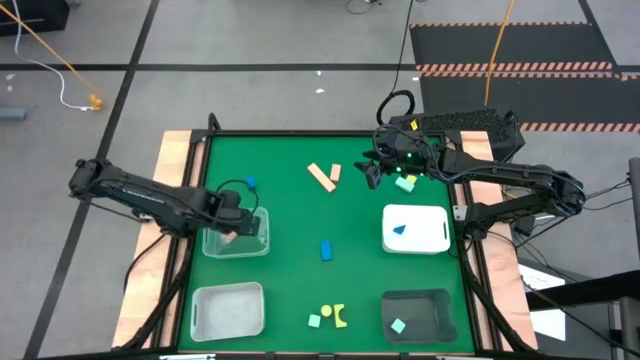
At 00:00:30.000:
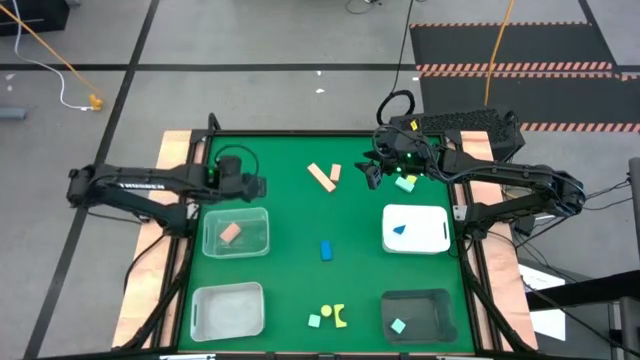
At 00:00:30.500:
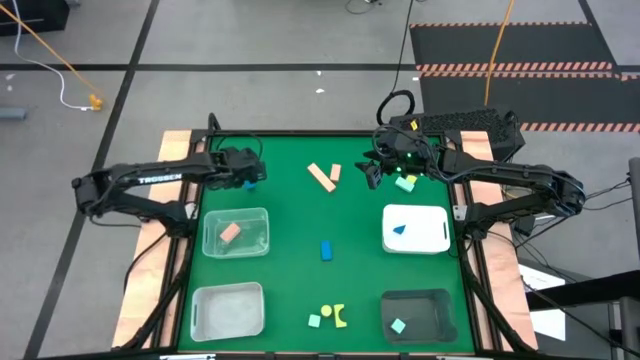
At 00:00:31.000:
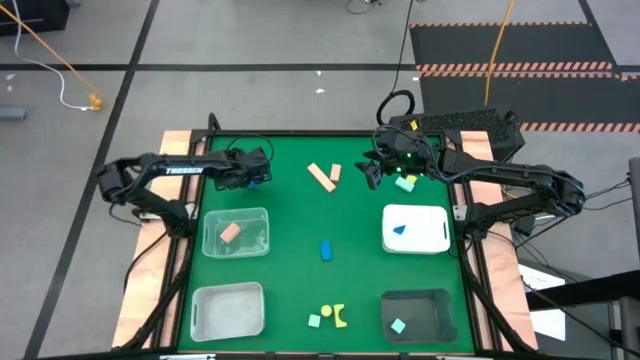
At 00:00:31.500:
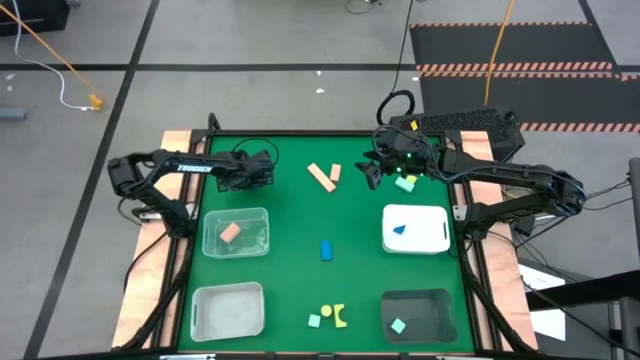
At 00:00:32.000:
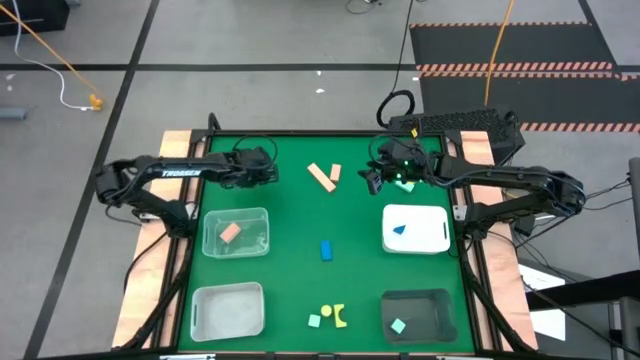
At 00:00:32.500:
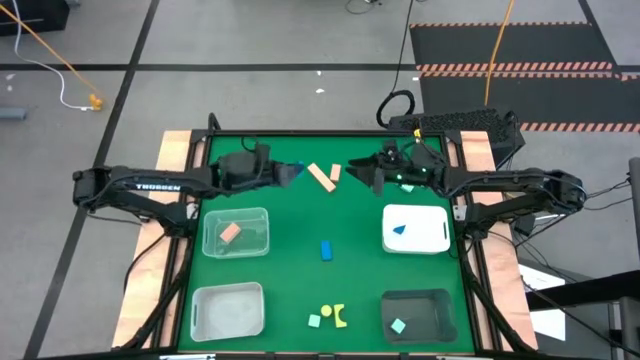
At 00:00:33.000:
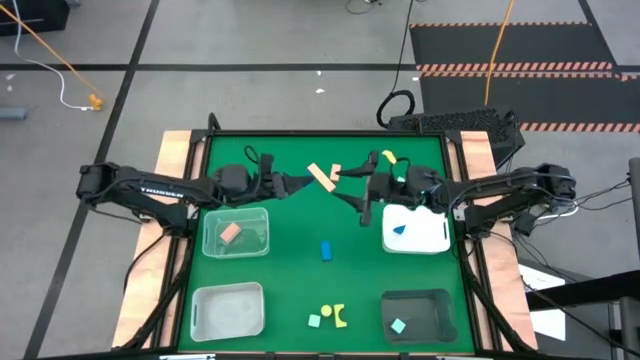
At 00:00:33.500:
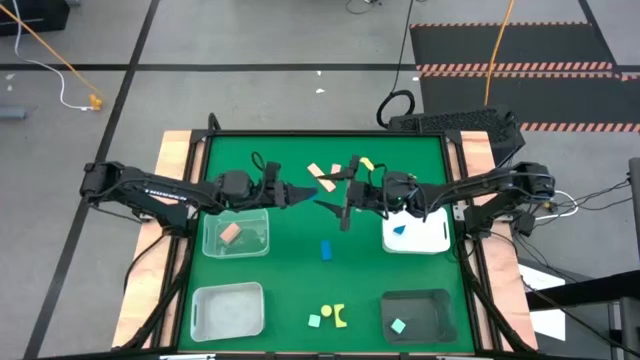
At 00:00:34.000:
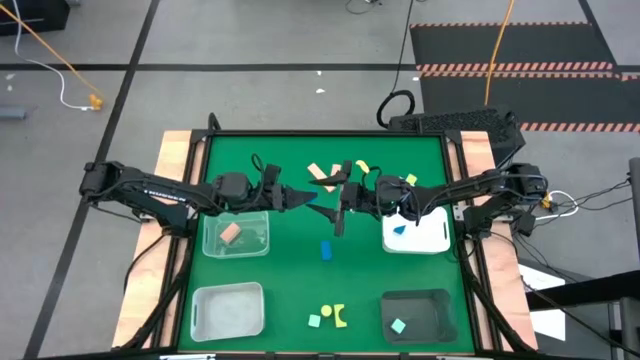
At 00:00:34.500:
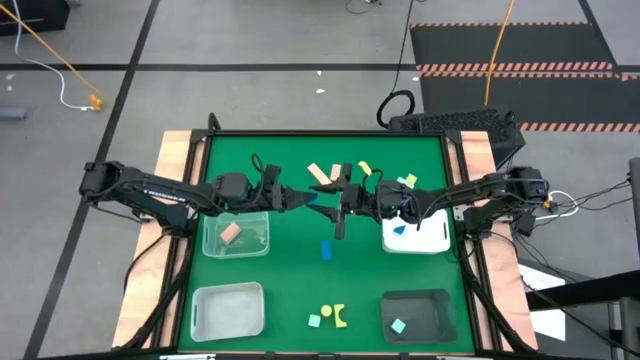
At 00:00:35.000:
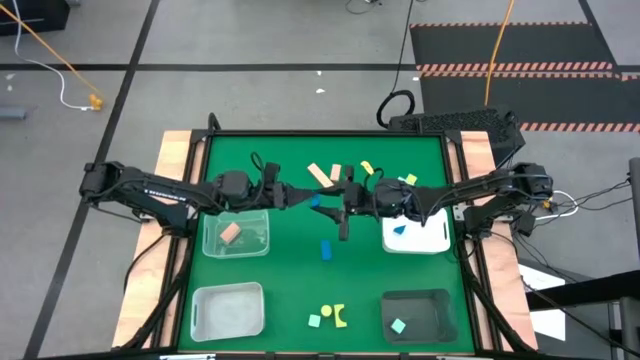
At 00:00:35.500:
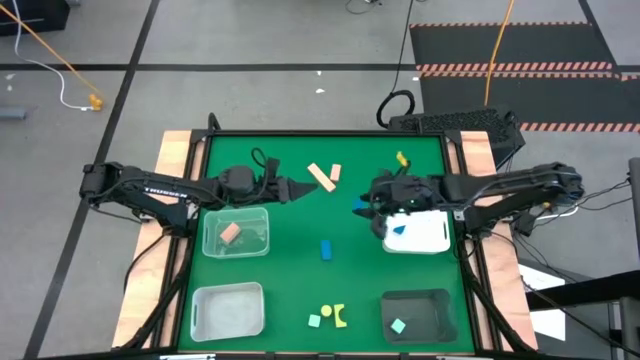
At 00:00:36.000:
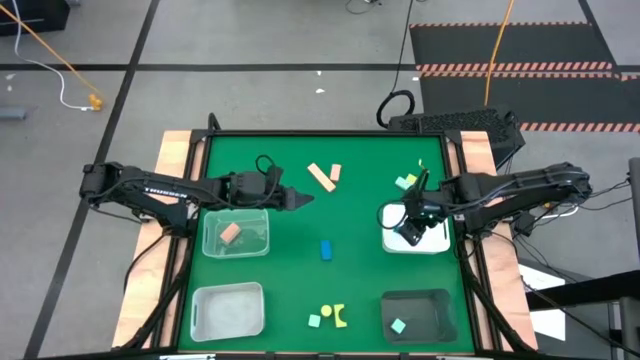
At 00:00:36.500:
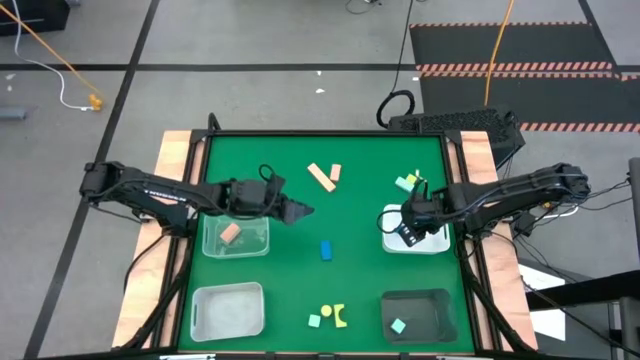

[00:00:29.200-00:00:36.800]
Task: Sort & place blocks by color
Put the top left blue block into the white bin

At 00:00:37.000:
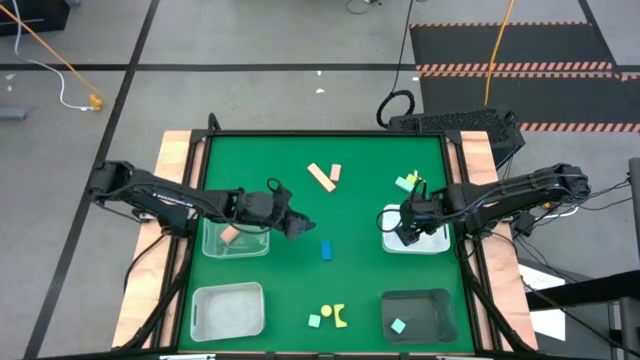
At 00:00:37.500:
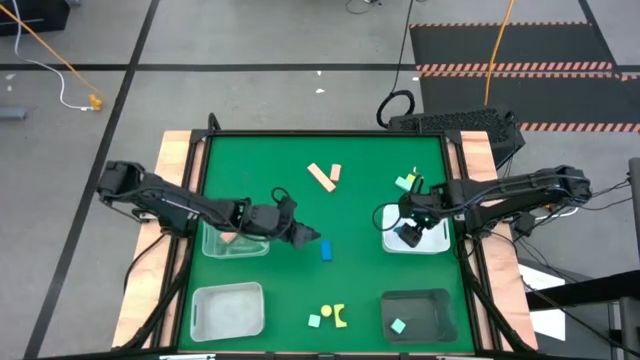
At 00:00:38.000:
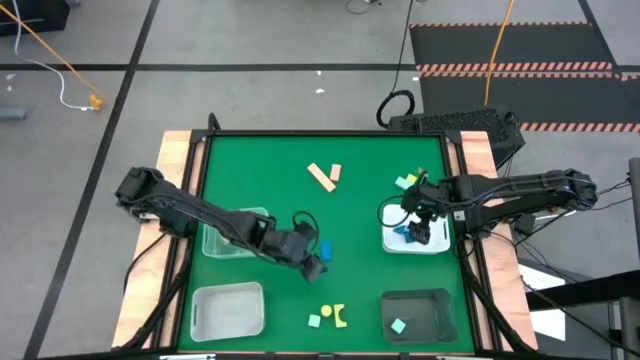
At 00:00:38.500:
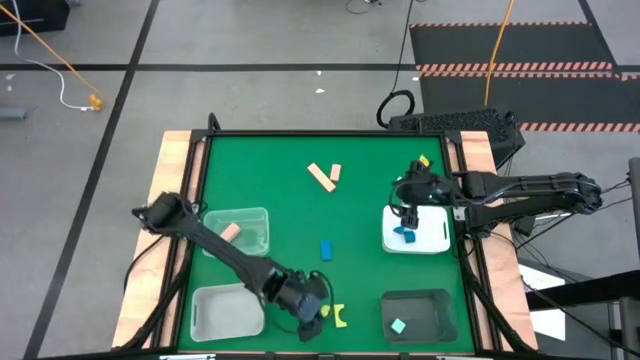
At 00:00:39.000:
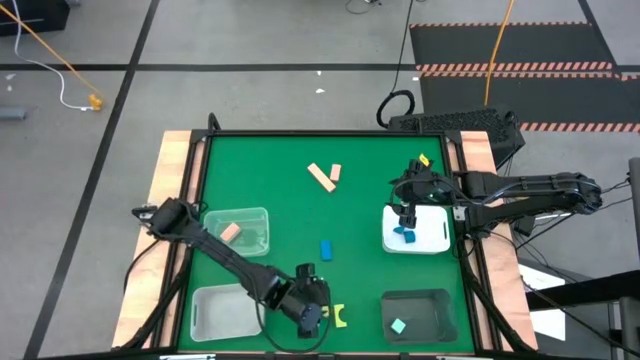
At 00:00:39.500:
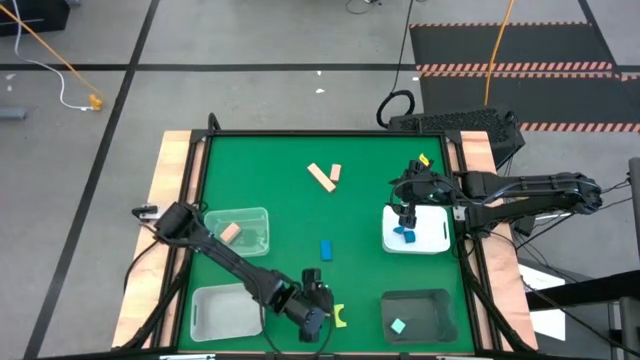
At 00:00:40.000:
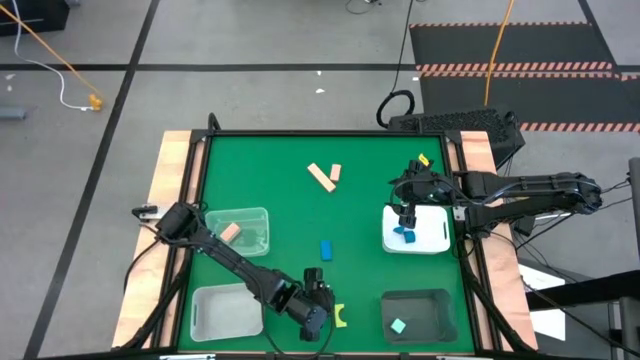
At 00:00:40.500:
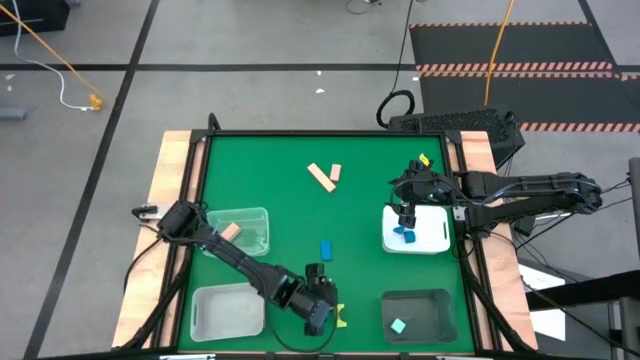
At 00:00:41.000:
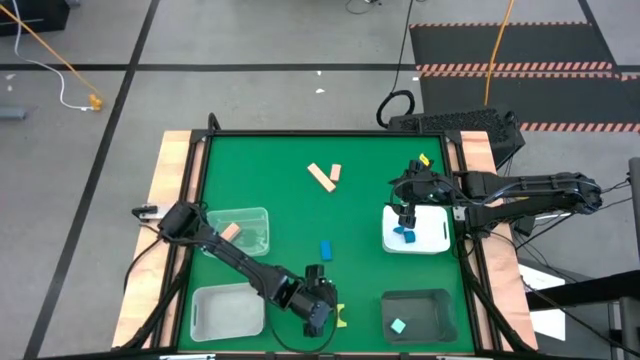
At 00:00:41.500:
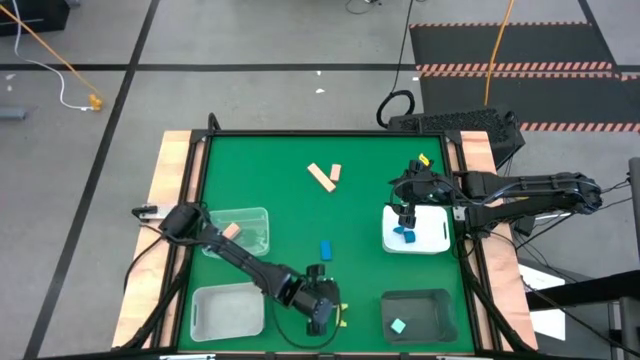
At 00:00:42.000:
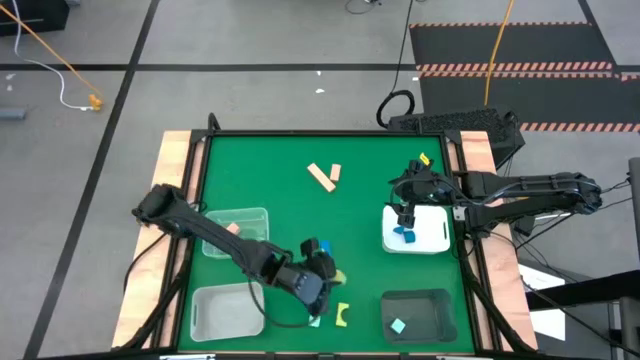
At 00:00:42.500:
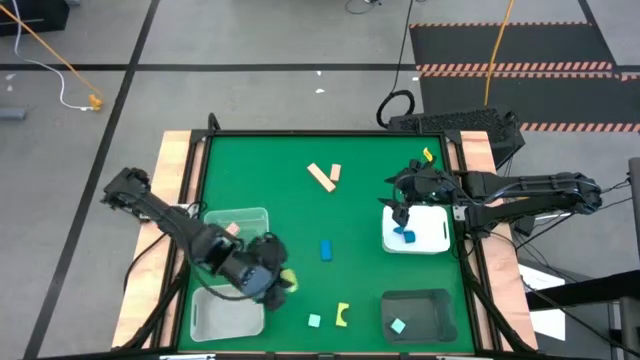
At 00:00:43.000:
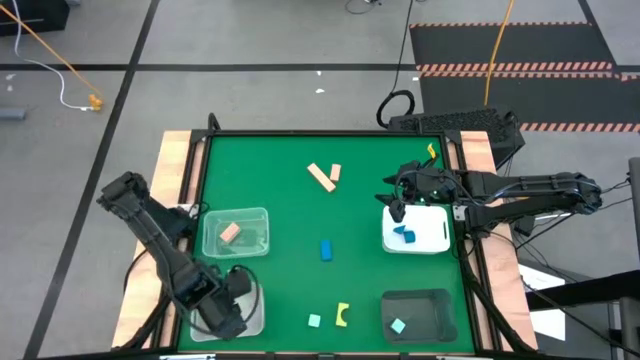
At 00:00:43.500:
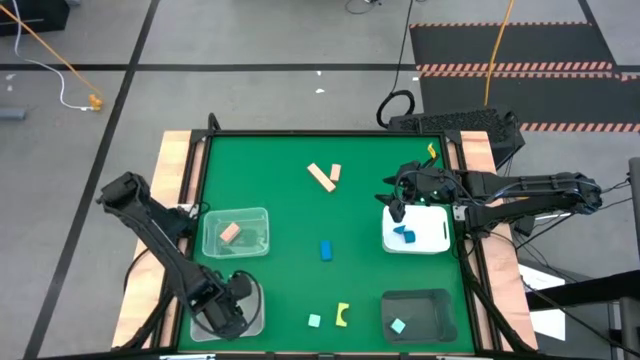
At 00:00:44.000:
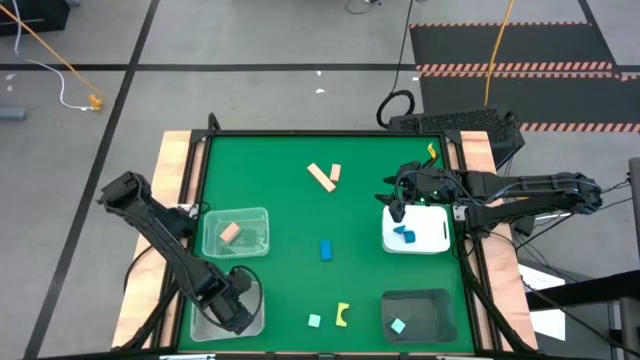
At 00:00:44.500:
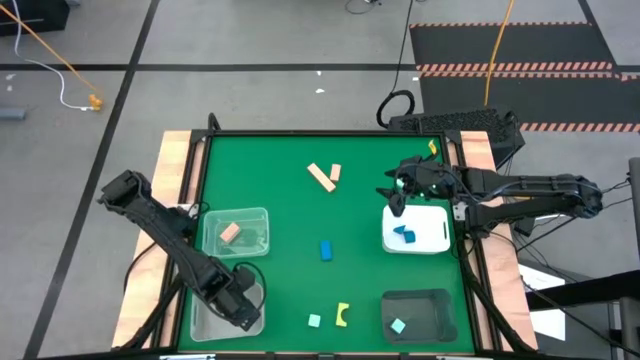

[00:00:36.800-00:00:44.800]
Put the bottom left yellow block into the gray bin
